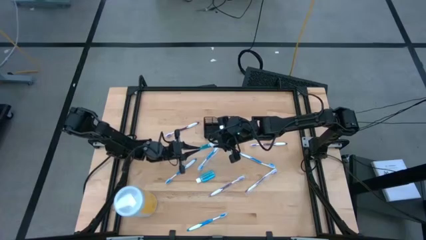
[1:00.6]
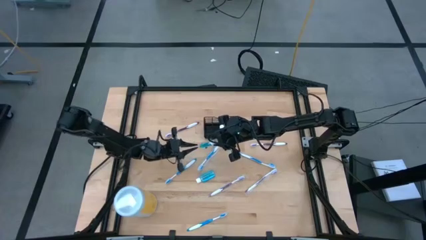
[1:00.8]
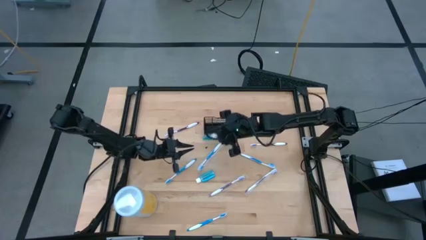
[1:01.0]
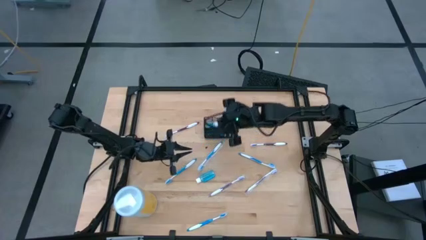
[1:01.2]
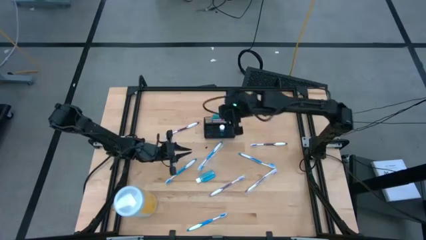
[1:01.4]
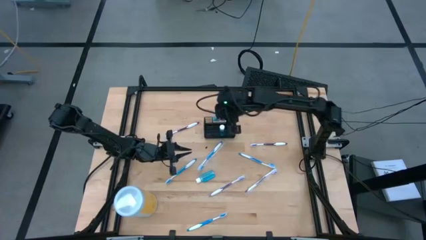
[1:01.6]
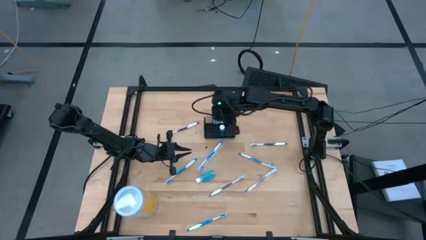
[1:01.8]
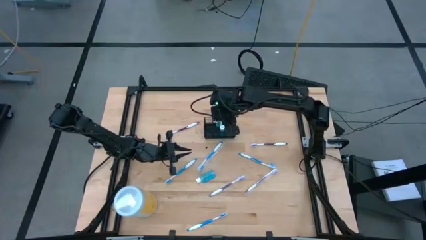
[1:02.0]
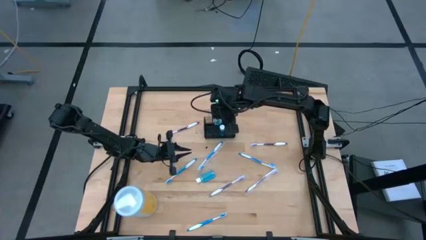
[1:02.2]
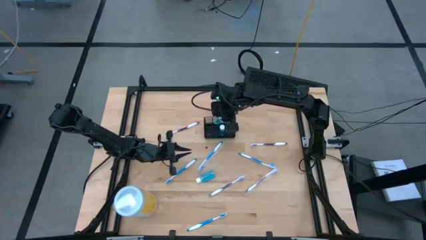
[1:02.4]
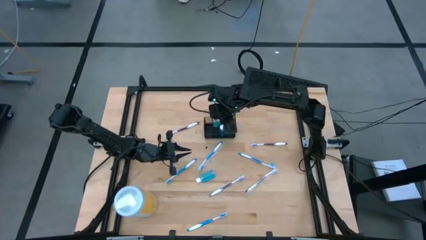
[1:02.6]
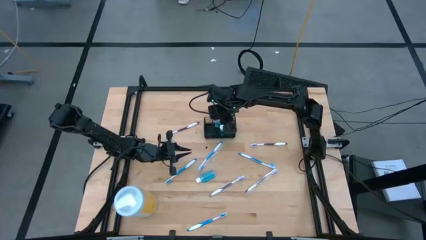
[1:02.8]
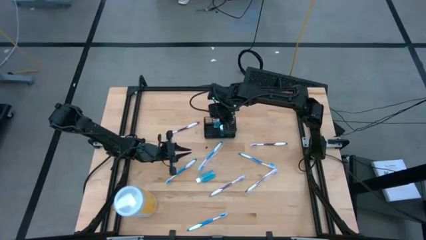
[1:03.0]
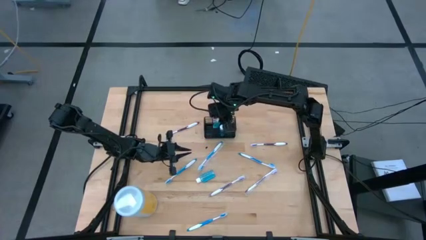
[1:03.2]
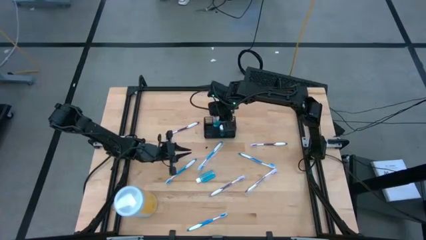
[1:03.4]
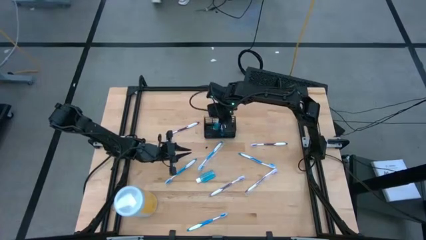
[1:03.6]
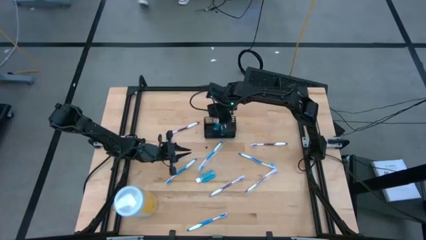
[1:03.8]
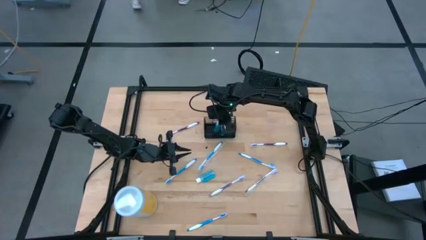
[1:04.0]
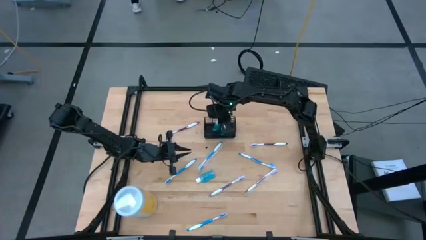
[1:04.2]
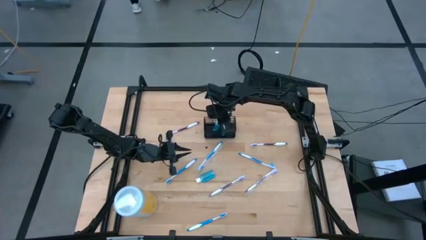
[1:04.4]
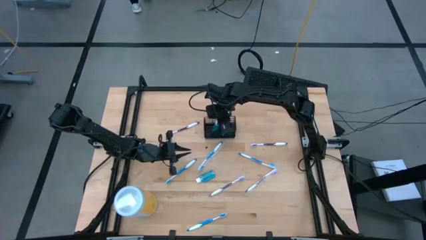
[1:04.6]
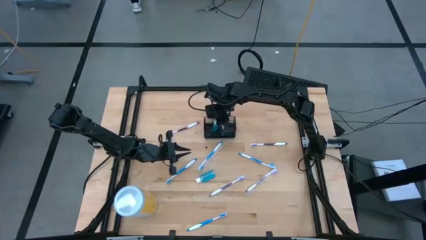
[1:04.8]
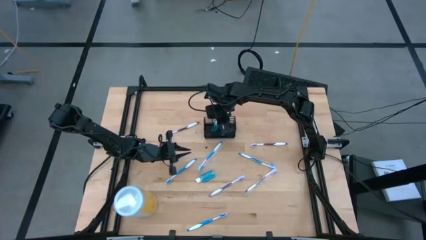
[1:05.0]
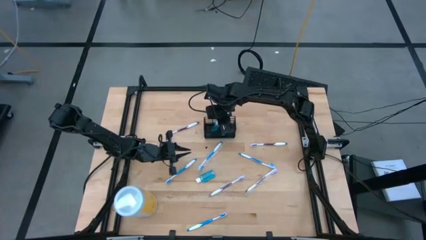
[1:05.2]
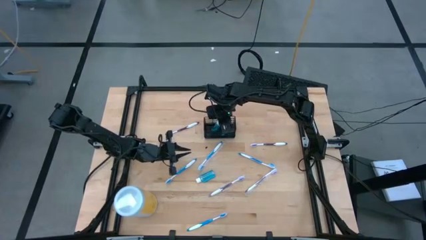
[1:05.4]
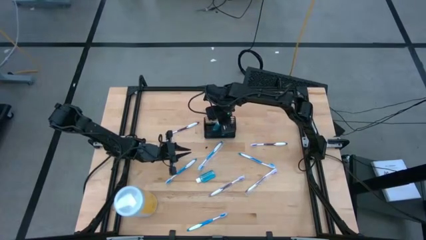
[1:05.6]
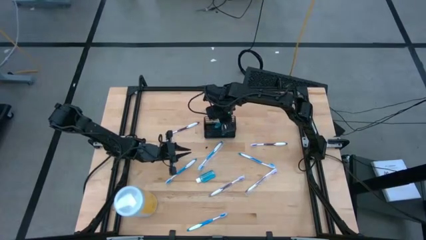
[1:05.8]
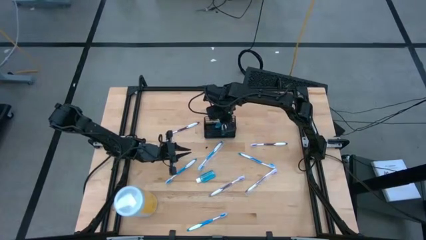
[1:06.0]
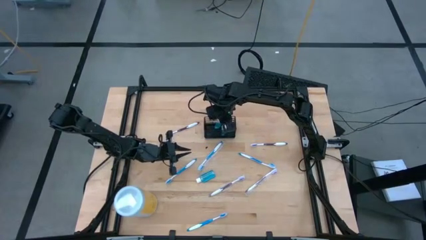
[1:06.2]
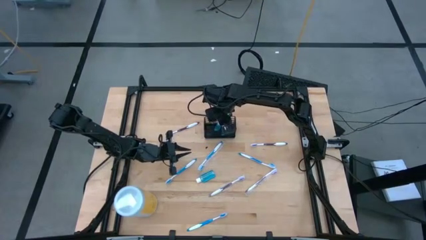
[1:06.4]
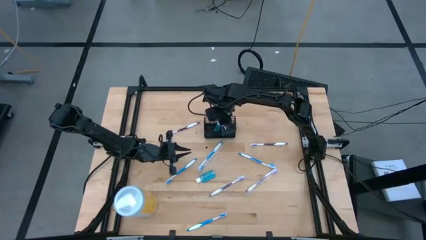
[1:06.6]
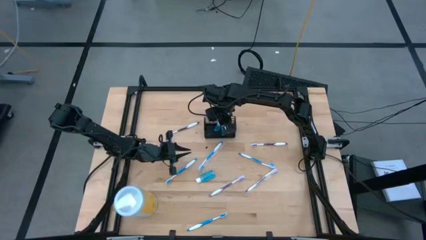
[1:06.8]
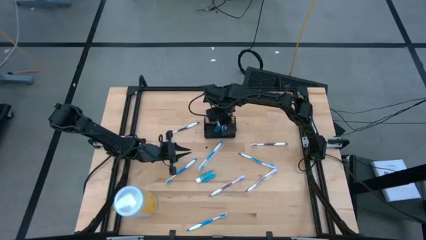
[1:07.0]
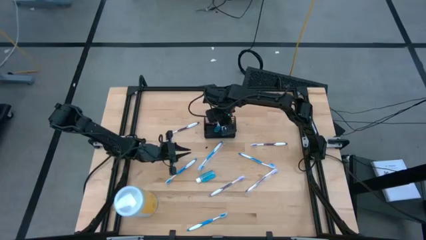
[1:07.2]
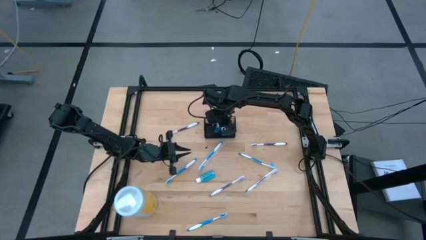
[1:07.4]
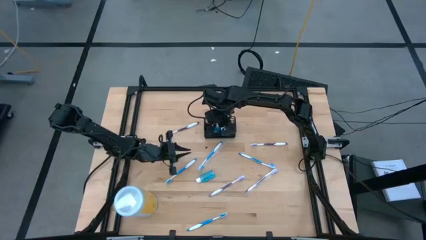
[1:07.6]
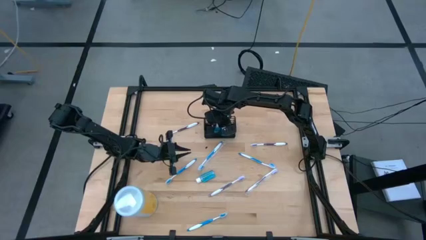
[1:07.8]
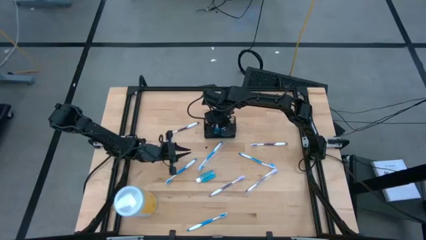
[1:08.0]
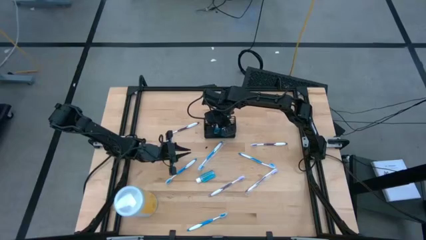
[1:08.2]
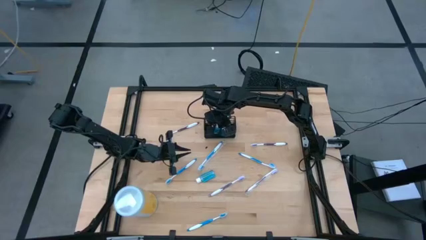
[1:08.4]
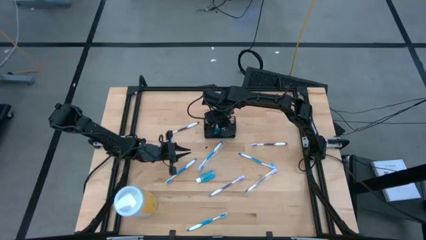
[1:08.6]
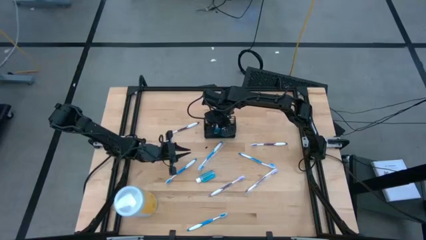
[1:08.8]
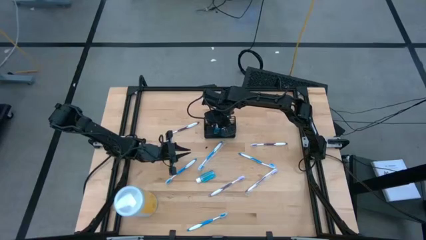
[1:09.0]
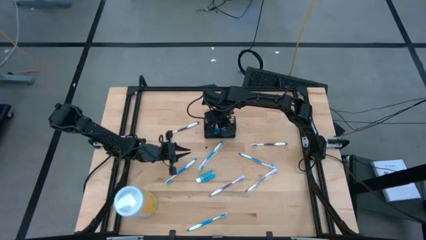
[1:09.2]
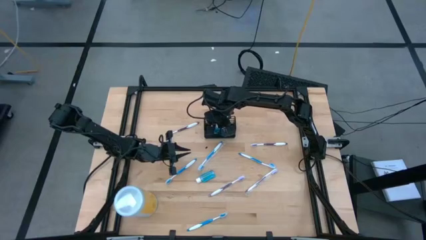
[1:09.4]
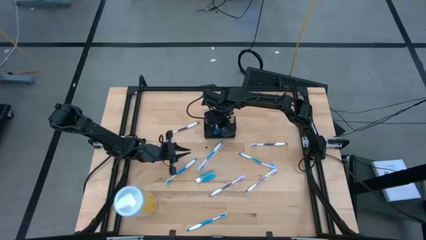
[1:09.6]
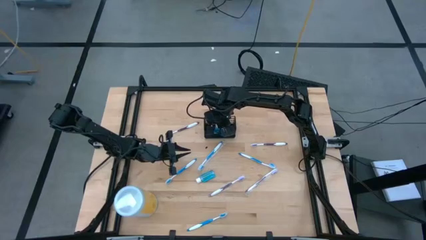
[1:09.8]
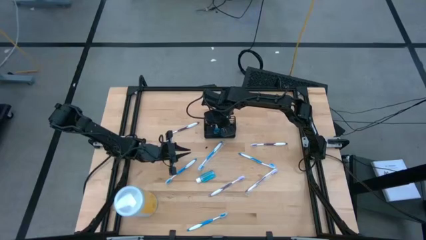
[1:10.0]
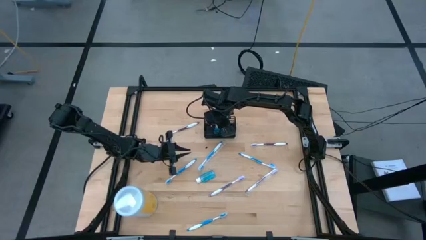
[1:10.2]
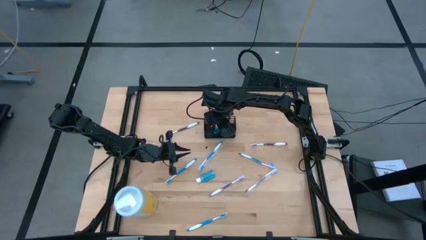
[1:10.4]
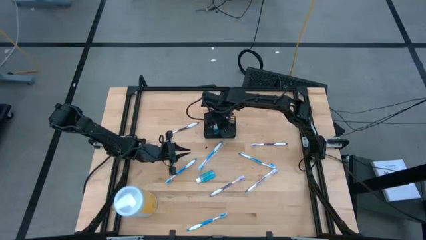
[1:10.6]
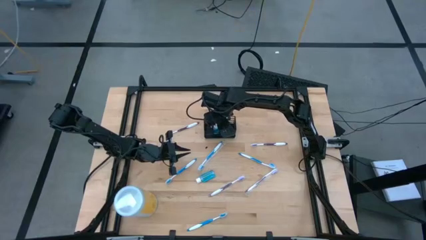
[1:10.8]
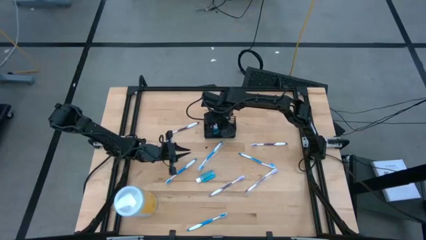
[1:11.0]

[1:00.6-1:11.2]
Task: Pick & Place toothbrushing station
Put the blue mouthwash bottle into the black organizer
